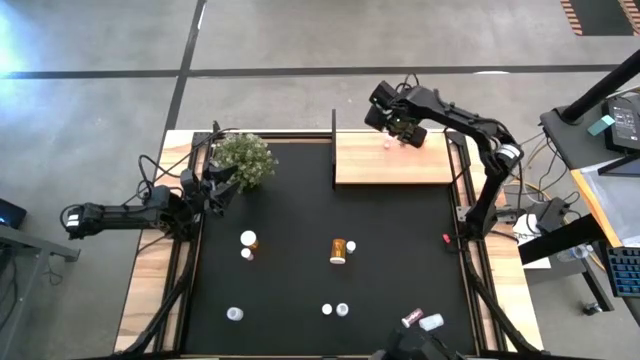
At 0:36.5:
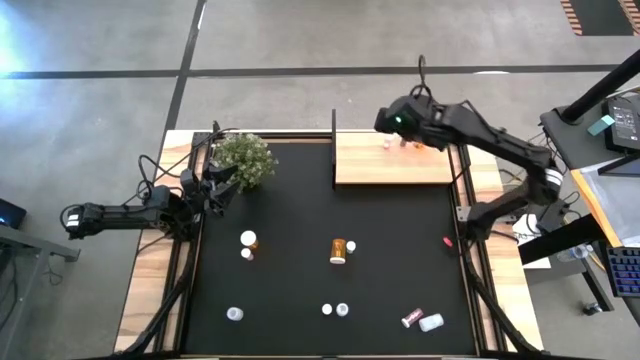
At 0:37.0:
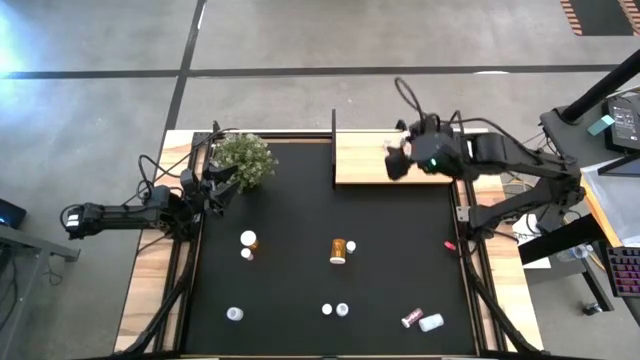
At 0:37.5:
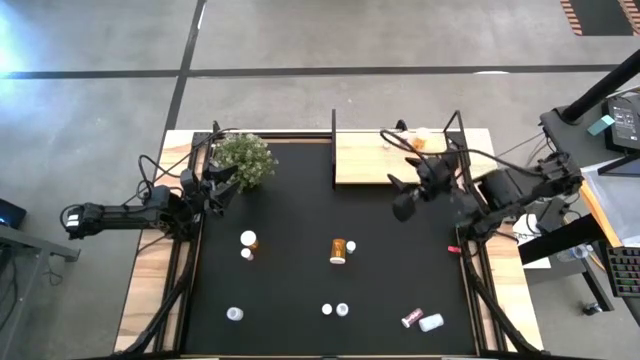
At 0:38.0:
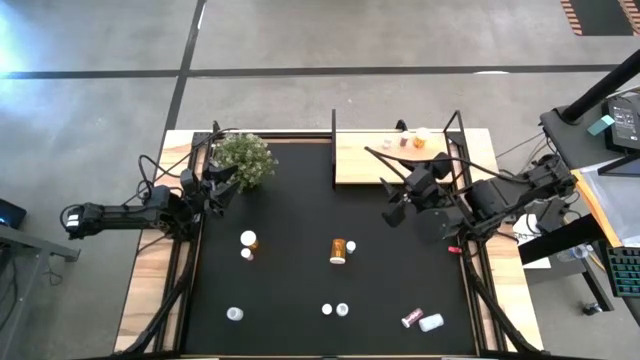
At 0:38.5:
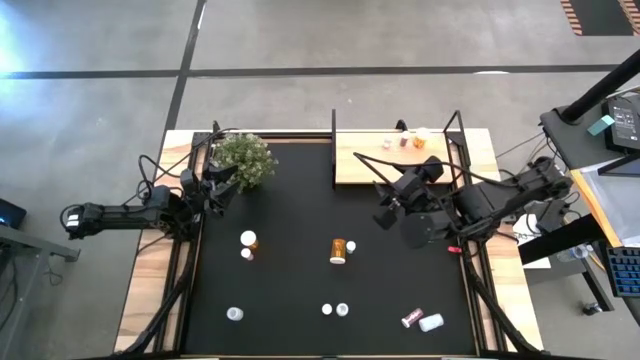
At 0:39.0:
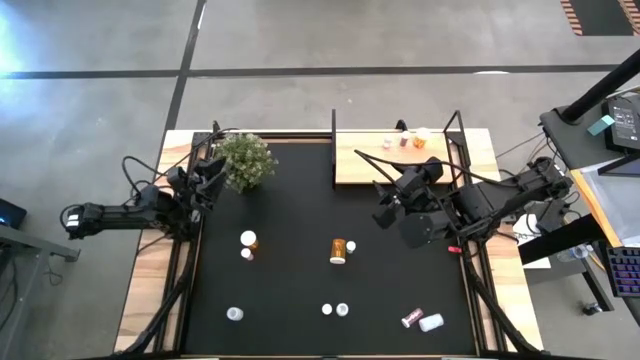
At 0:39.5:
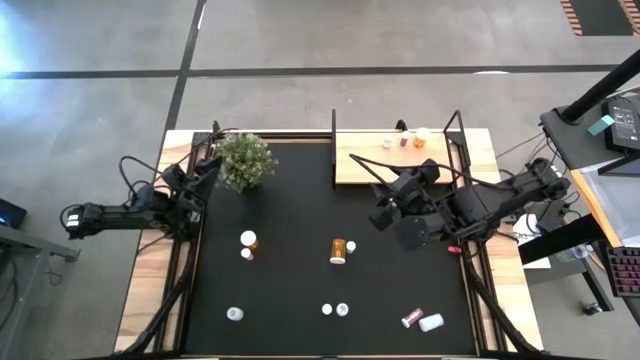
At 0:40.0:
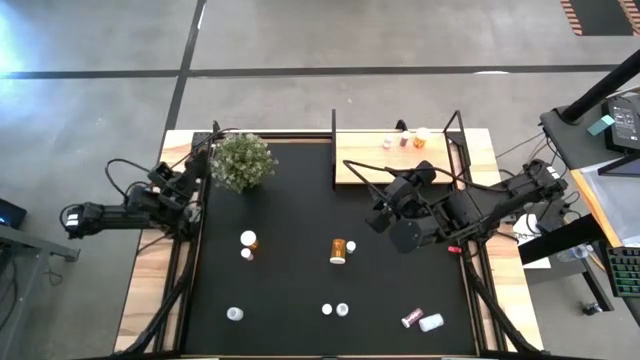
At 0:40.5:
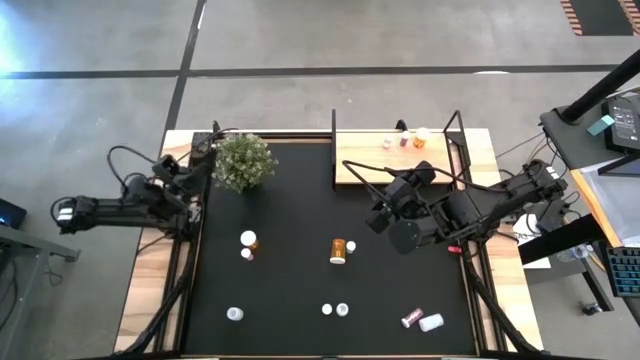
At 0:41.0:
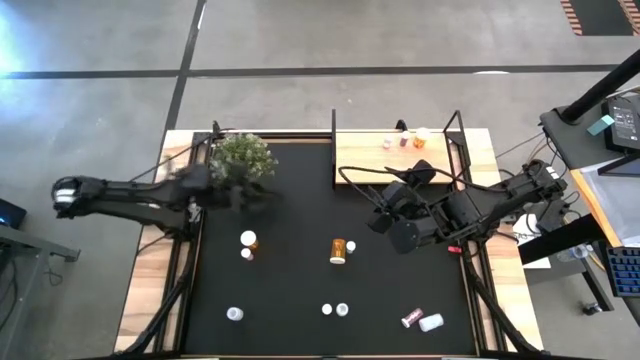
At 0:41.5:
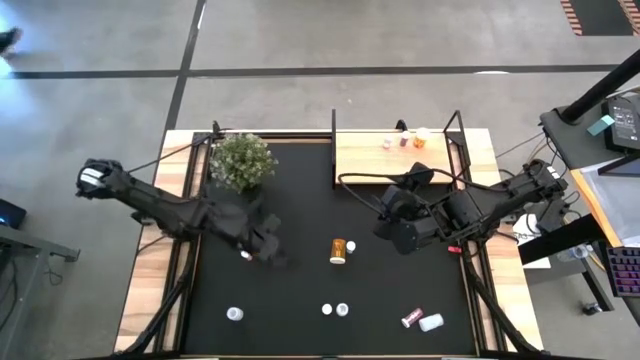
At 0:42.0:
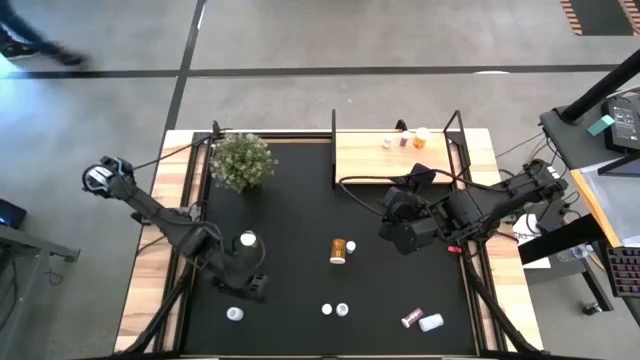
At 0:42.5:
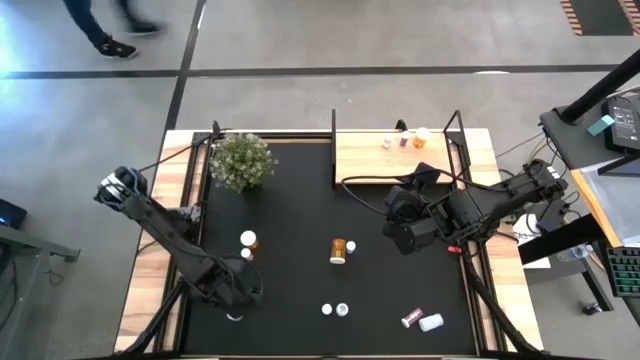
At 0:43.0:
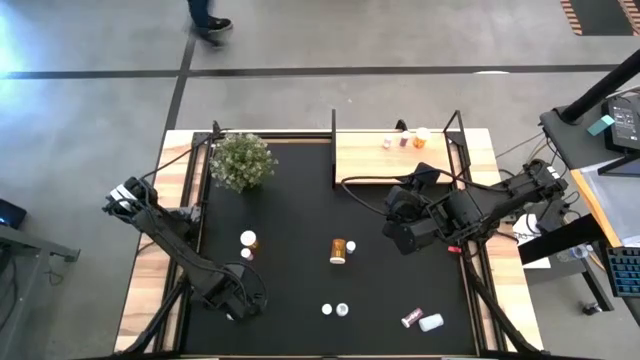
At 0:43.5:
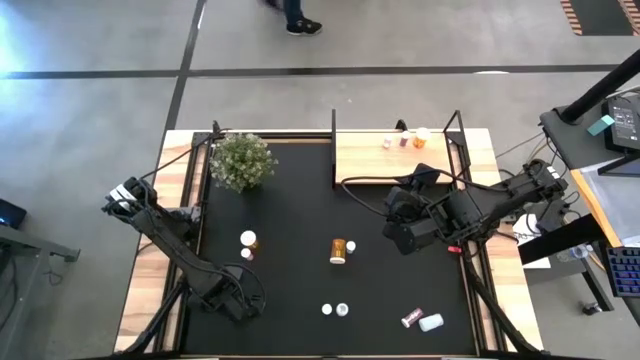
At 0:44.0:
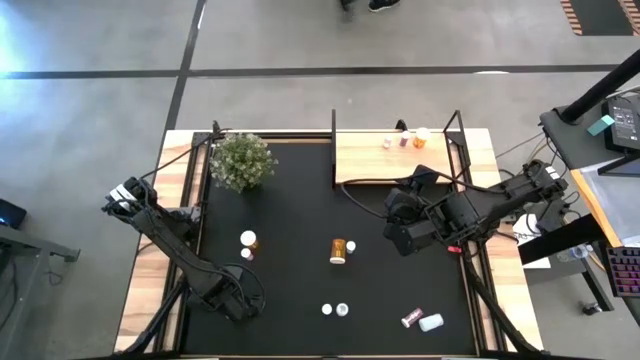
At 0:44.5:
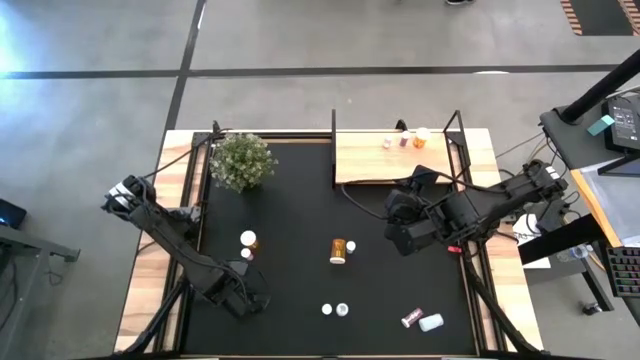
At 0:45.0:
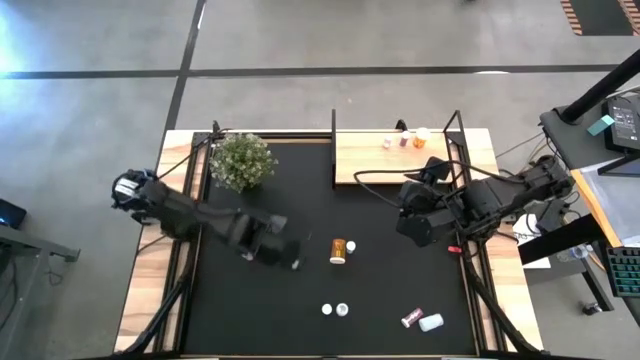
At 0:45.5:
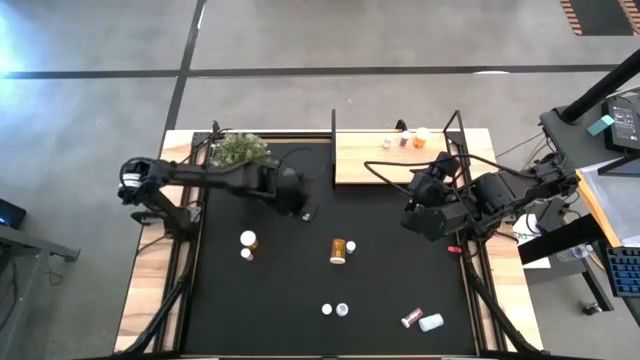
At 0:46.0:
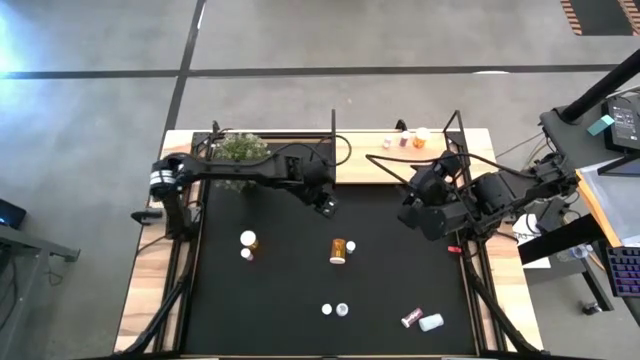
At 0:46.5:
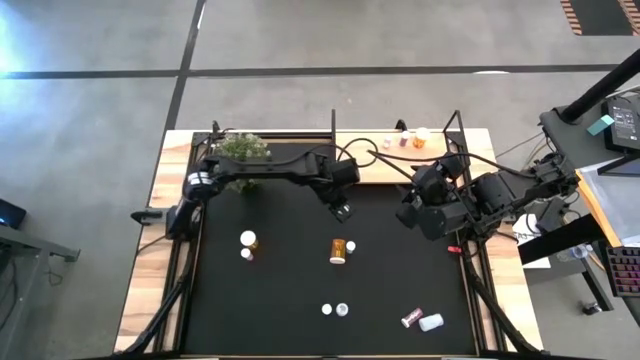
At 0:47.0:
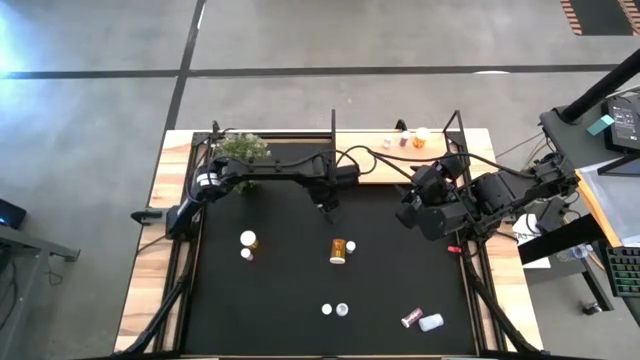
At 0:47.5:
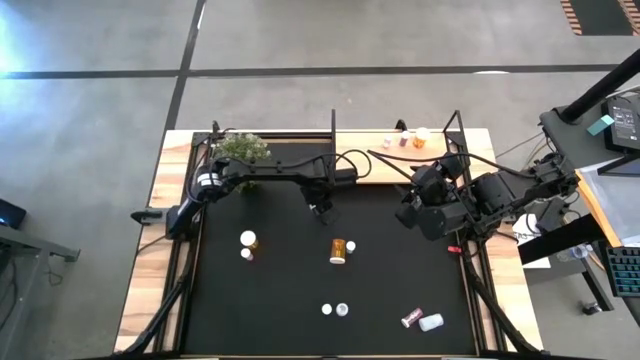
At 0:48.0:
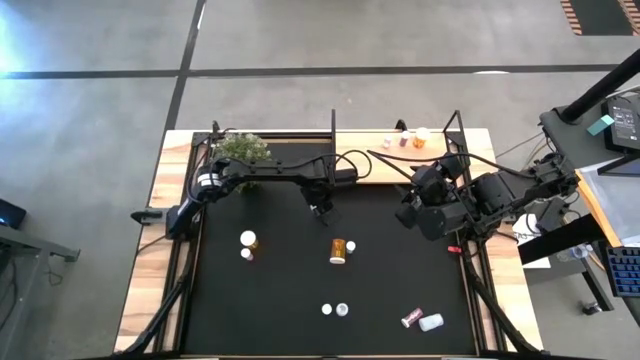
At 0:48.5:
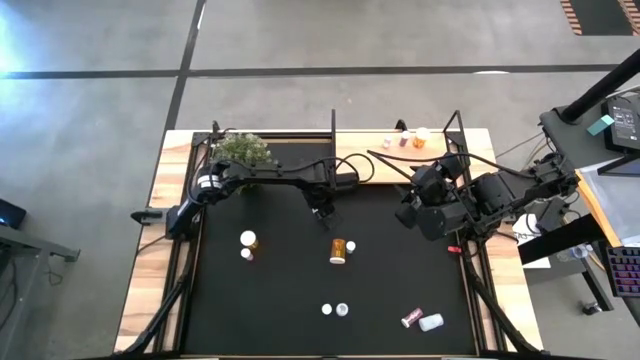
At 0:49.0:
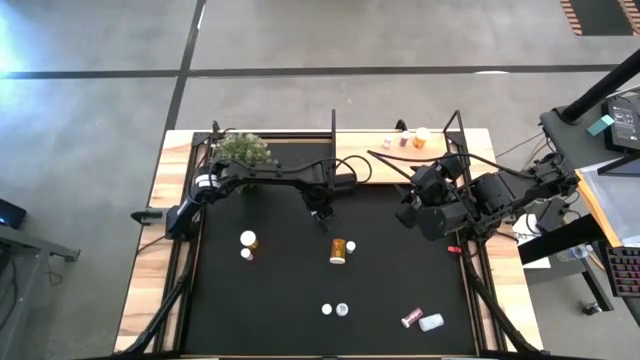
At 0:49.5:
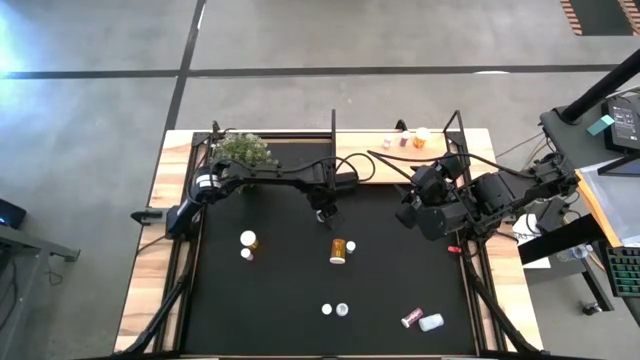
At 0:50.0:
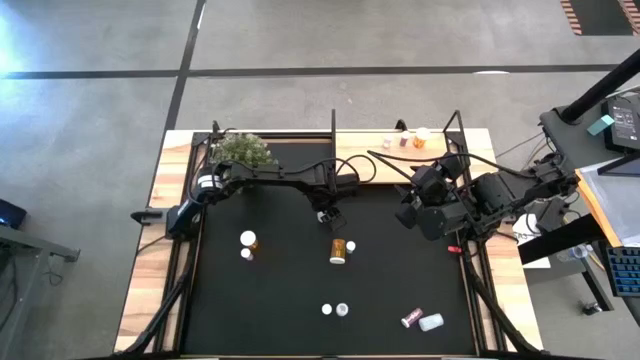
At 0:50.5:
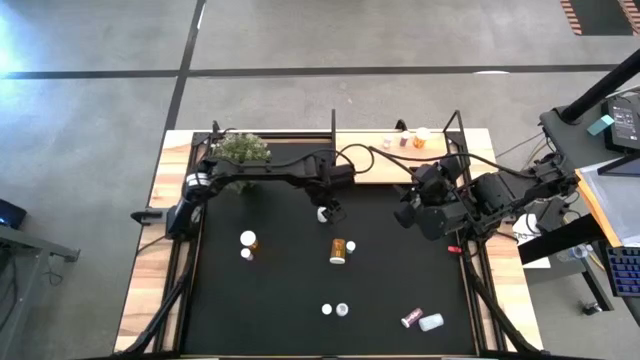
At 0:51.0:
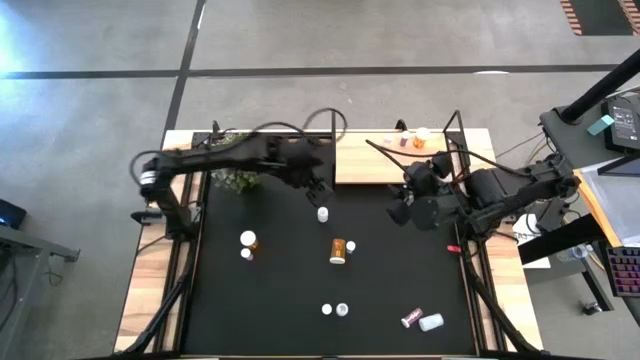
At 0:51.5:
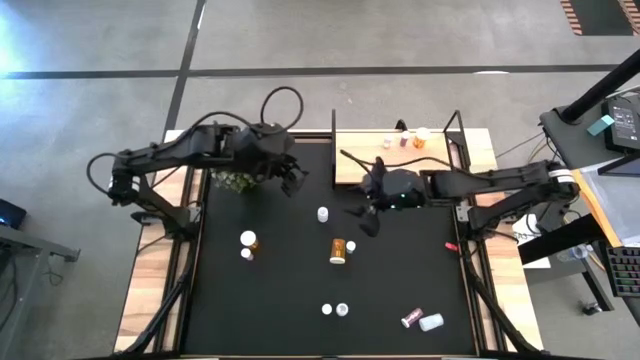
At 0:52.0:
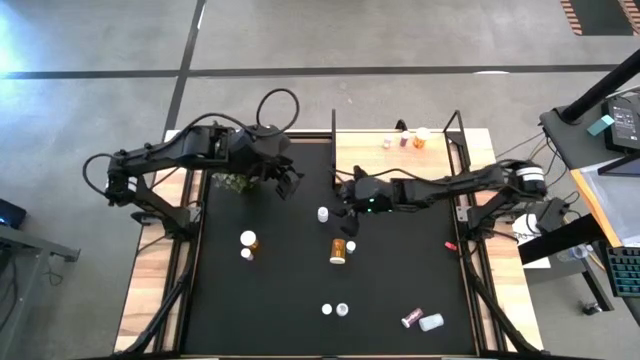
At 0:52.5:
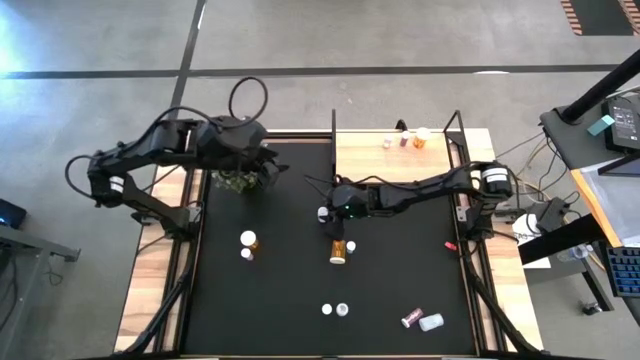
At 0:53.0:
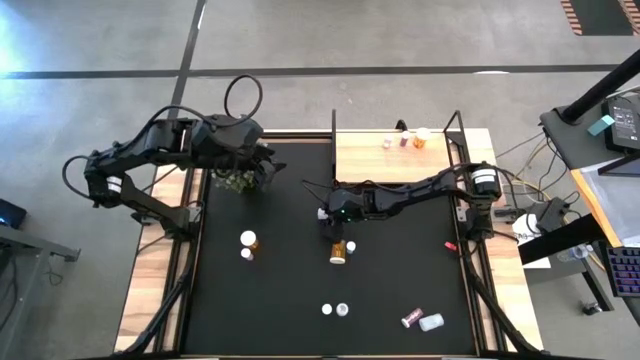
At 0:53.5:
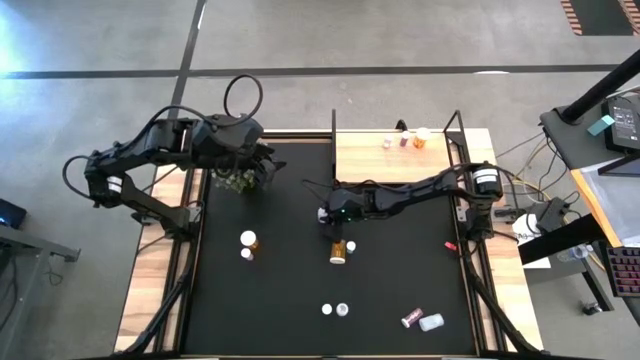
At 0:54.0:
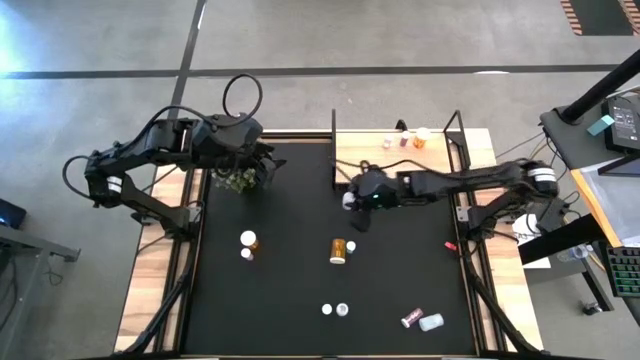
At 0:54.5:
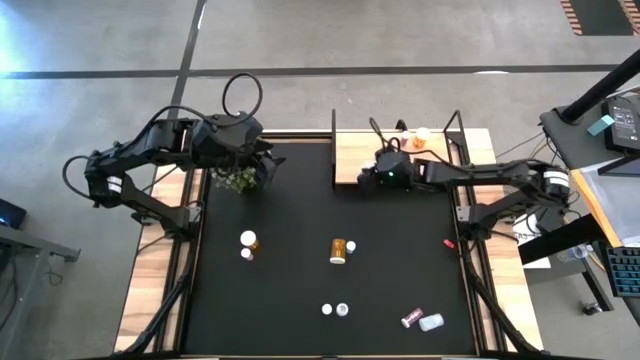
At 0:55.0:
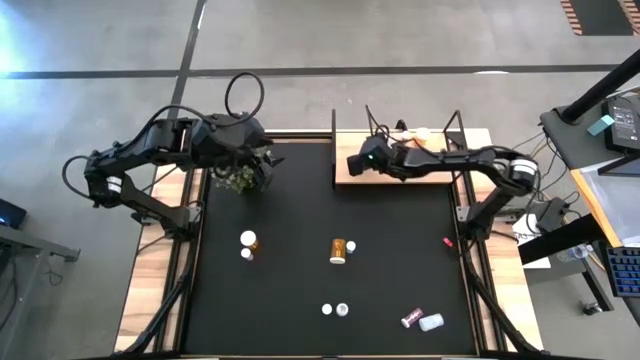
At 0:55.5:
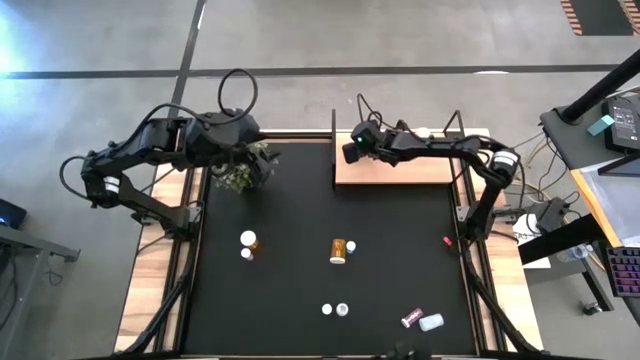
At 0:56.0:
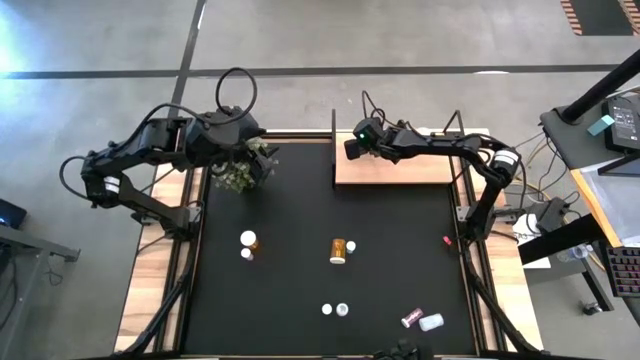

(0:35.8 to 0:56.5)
Task: Pick and place medicine bottles onto shelf by color
Put the top left white pill bottle on the shelf
